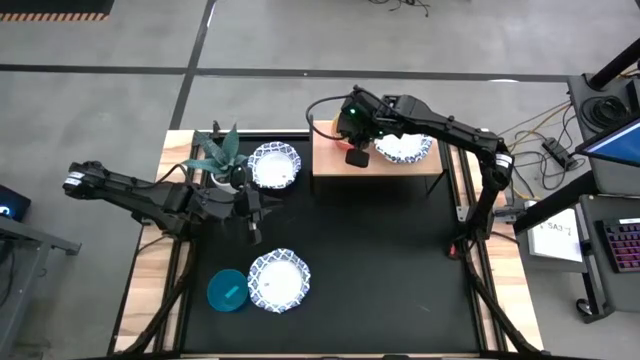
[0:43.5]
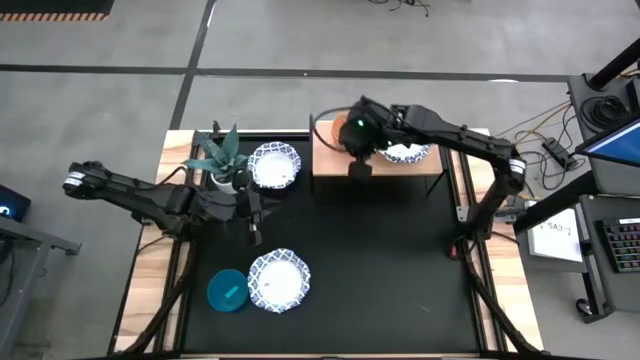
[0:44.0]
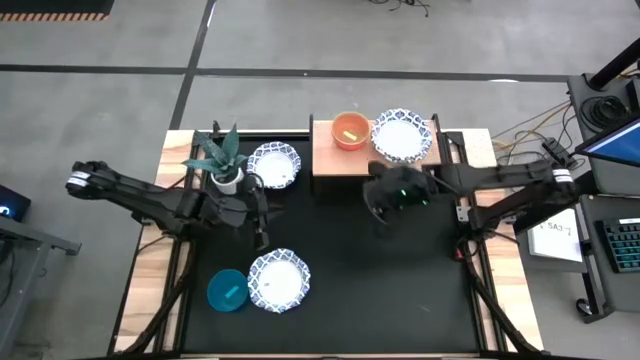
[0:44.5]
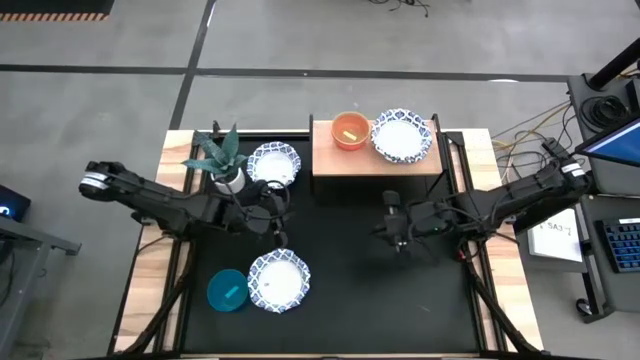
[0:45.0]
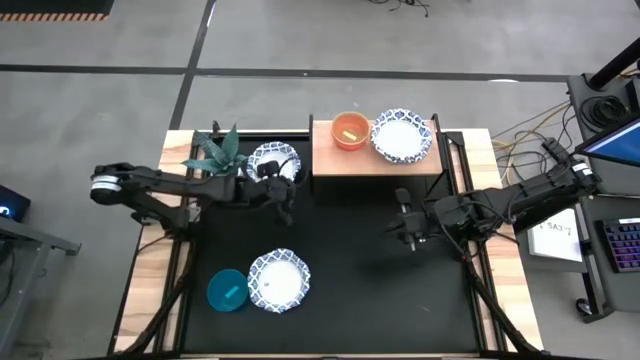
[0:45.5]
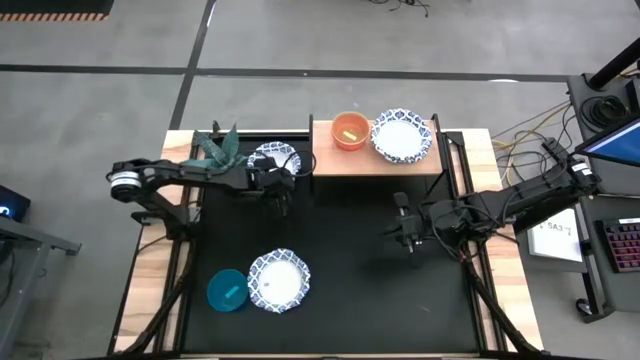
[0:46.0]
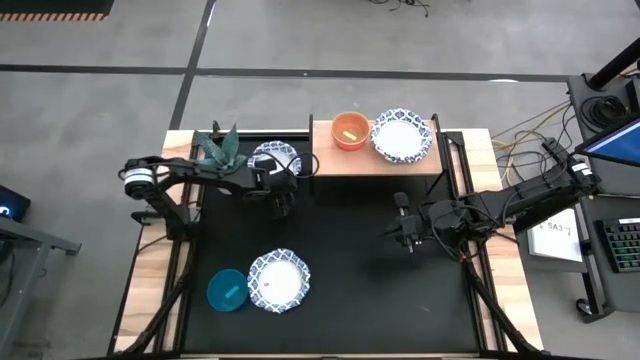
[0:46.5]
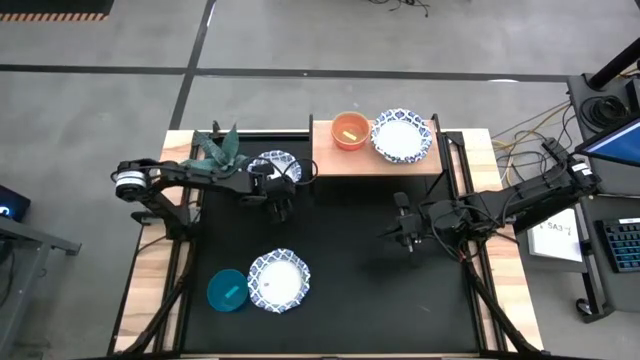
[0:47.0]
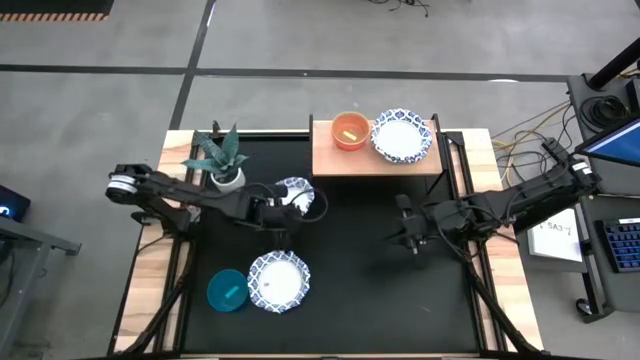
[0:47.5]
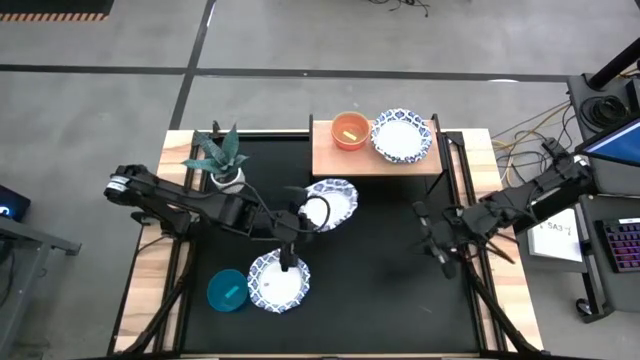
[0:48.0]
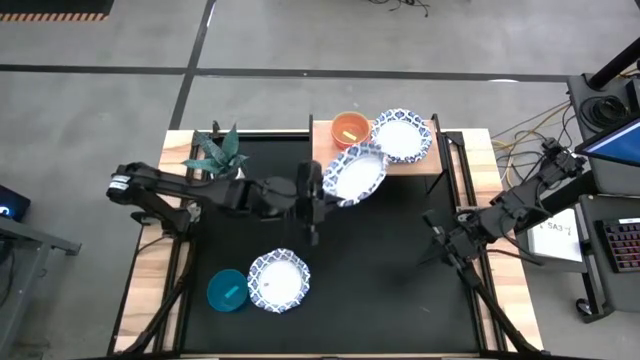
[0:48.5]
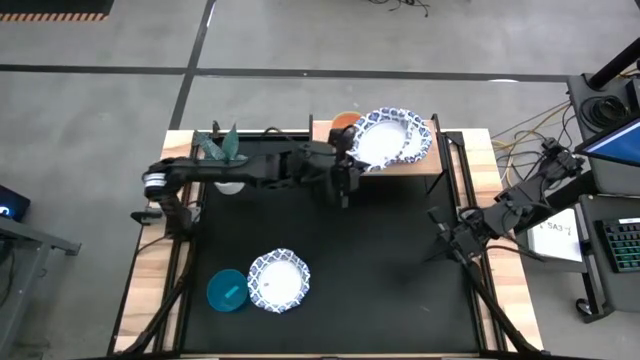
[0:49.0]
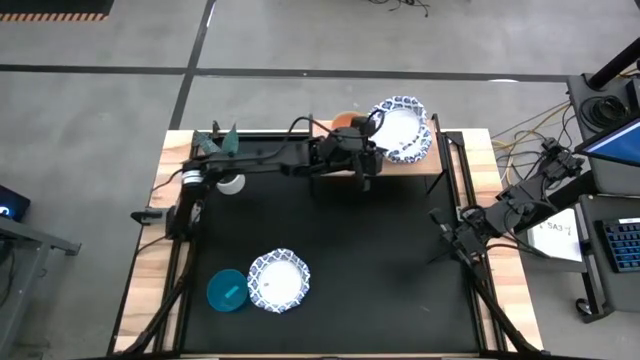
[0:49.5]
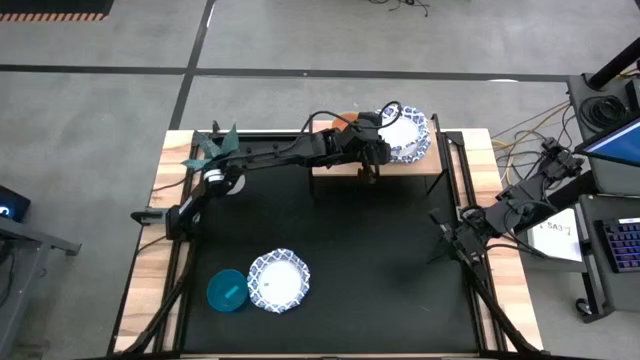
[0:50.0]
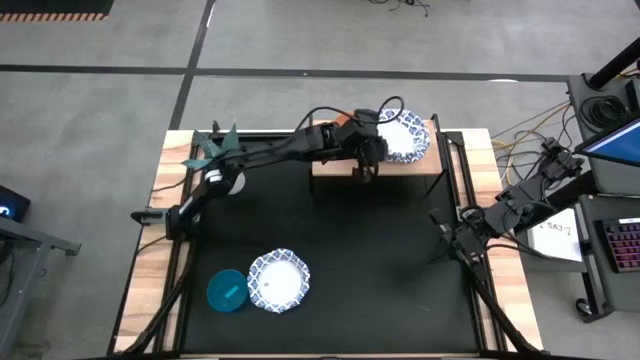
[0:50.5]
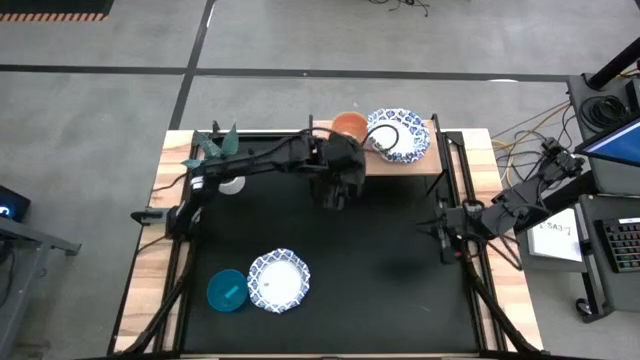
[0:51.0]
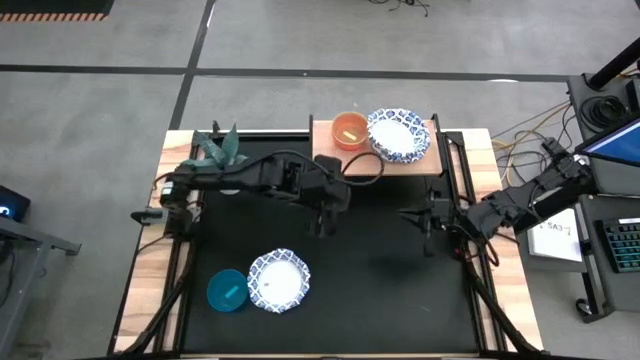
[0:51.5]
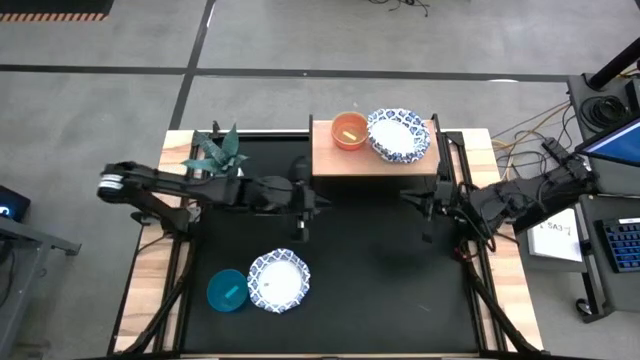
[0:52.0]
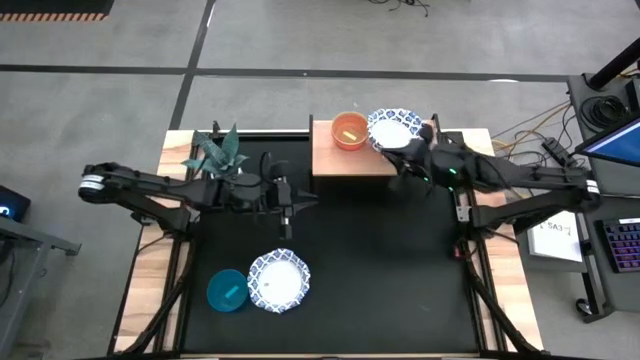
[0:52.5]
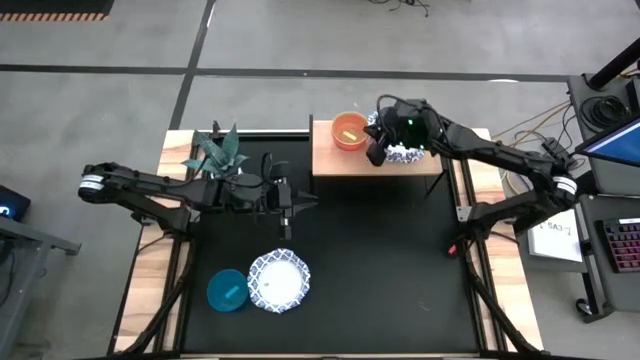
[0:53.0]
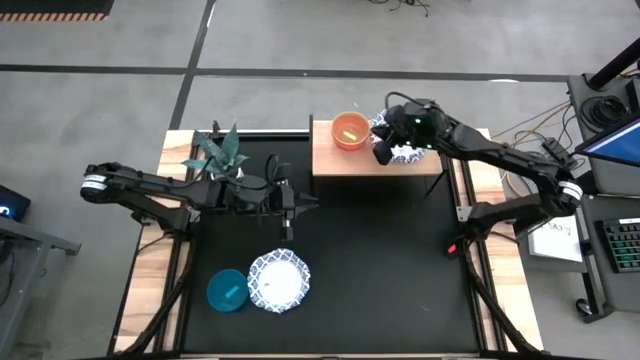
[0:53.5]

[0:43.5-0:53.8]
Task: Place and stack bowls onto a shelf
Stack the white paper plate on top of the white paper plate on the shelf

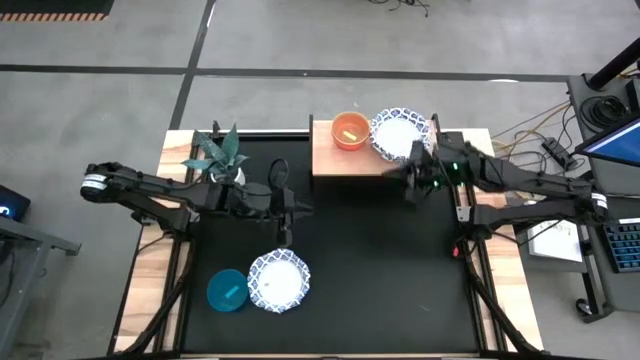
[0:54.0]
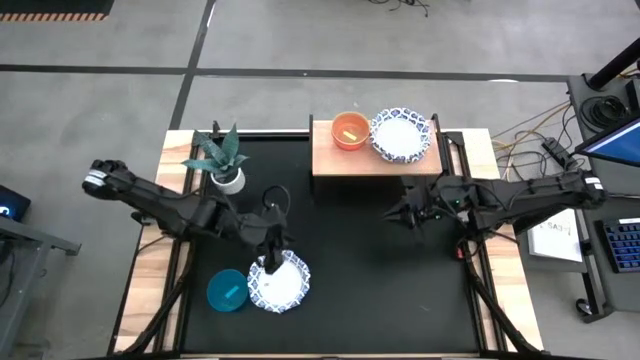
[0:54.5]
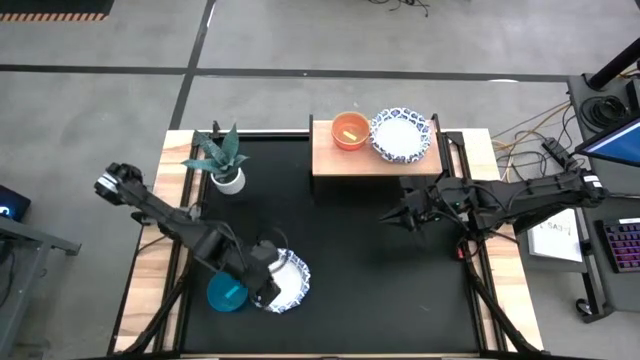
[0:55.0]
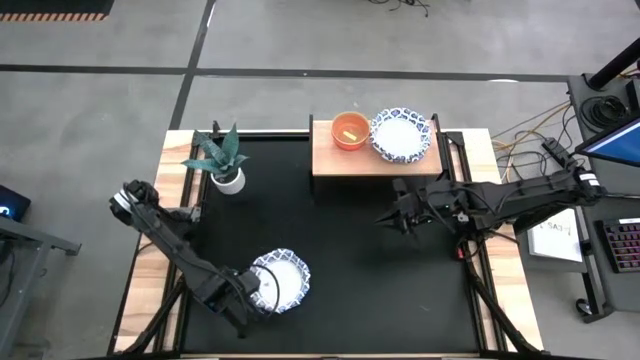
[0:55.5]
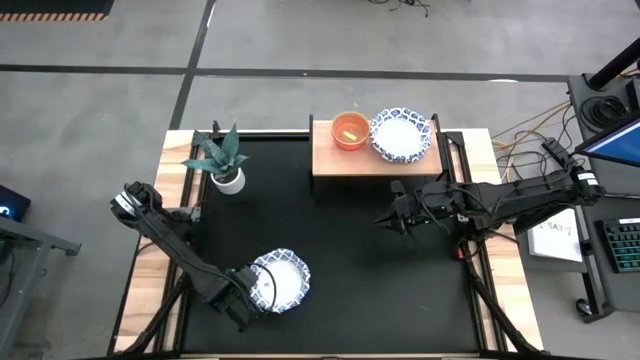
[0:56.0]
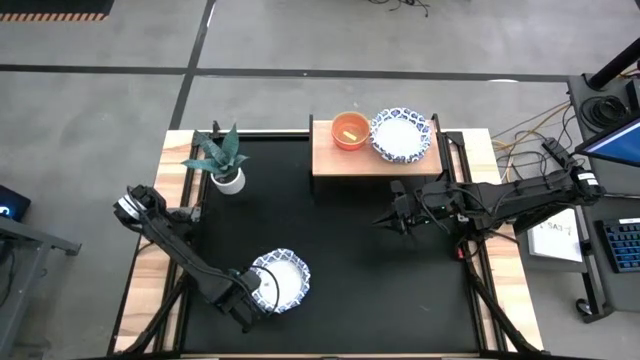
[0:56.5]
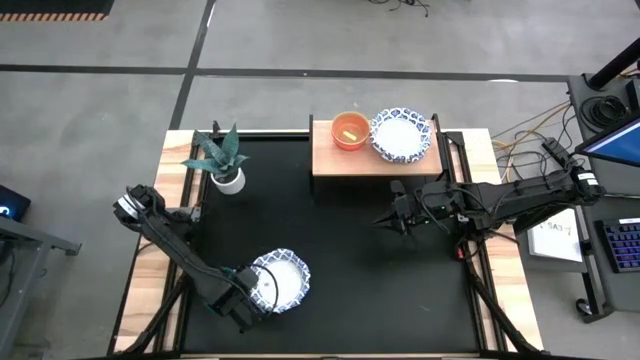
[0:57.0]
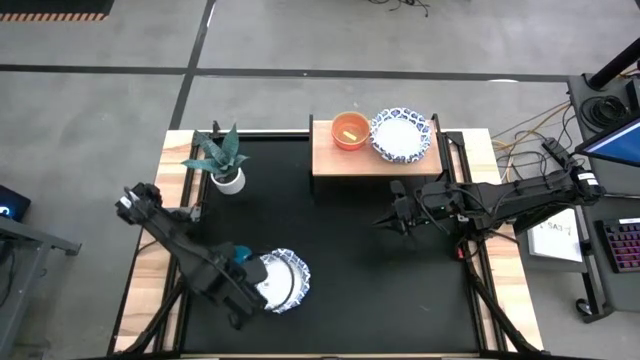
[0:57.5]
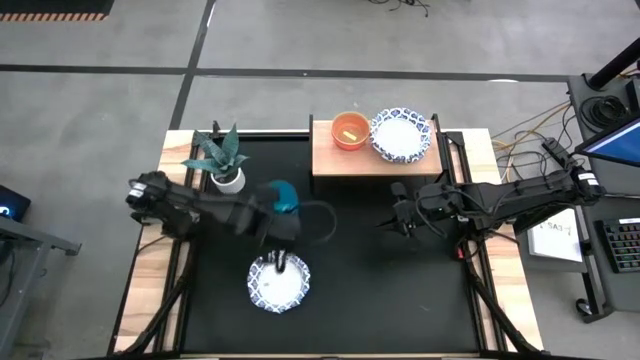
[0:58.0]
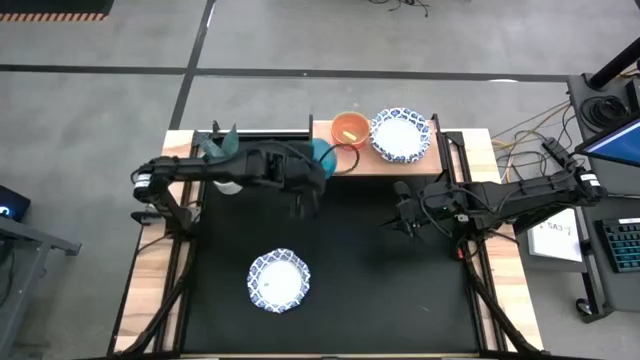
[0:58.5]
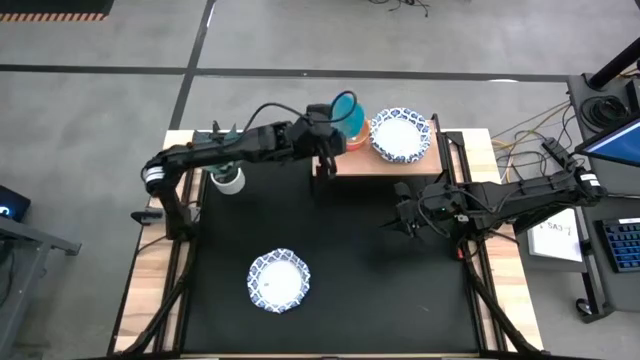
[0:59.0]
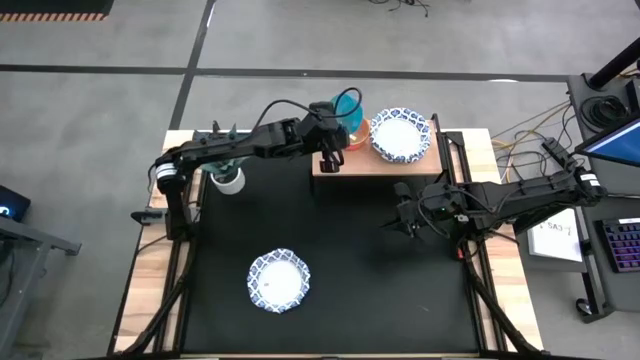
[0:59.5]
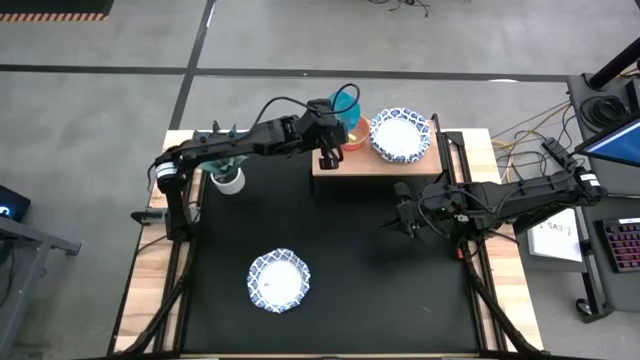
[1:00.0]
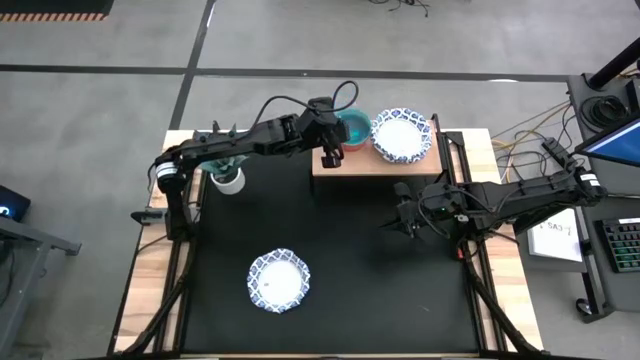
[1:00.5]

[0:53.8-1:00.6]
Stack the blue bowl on the yellow bowl on the stock shelf

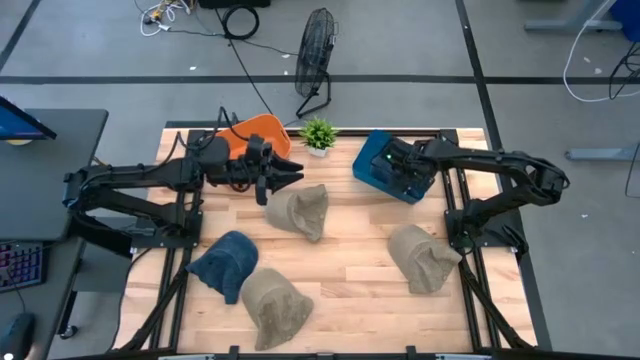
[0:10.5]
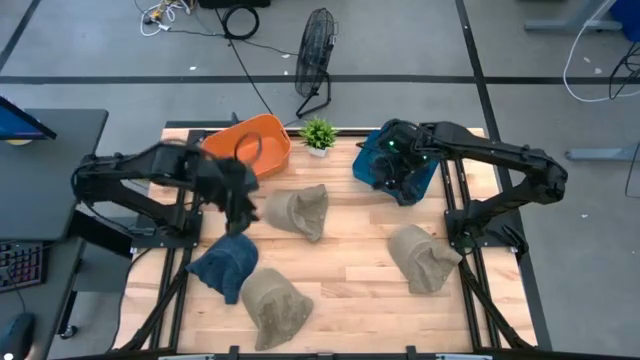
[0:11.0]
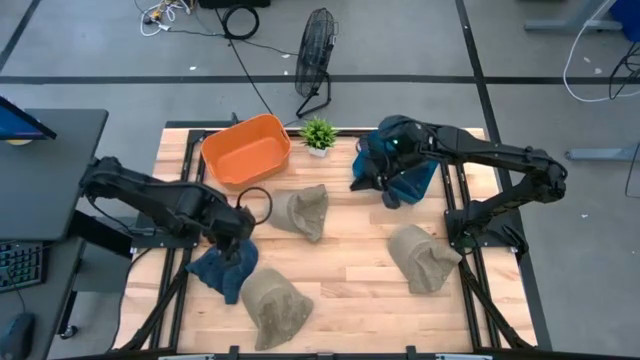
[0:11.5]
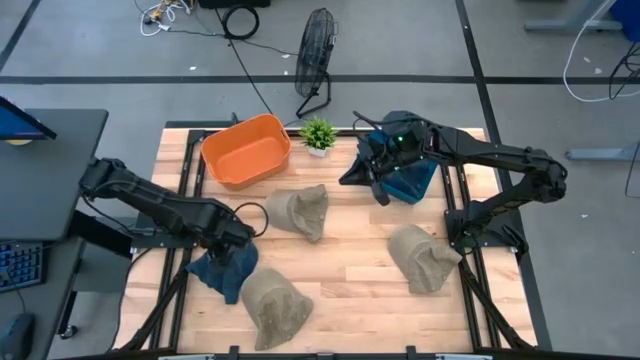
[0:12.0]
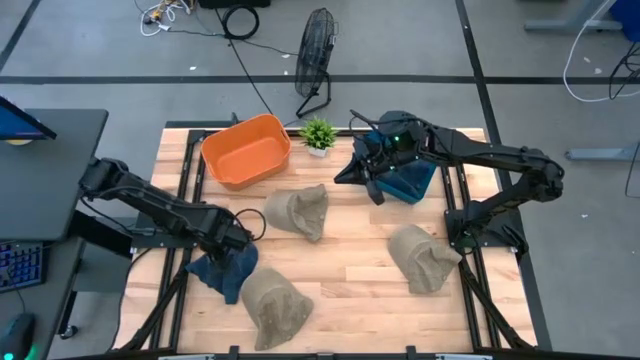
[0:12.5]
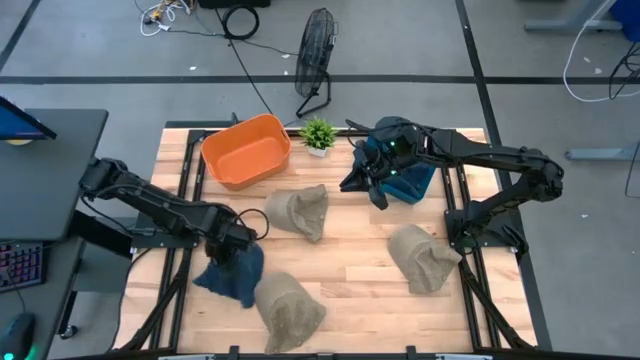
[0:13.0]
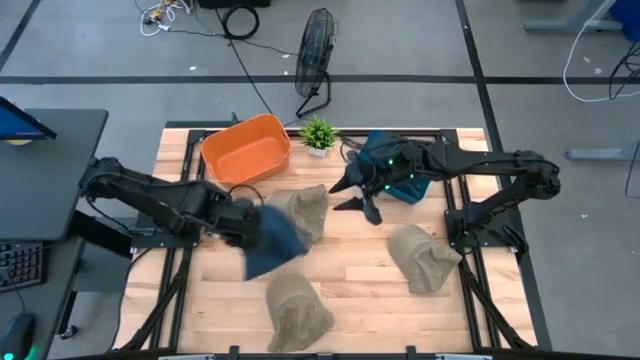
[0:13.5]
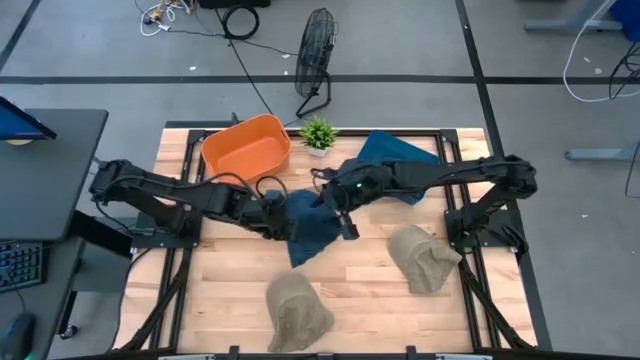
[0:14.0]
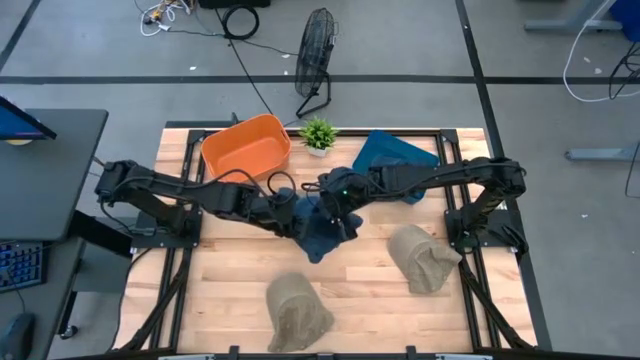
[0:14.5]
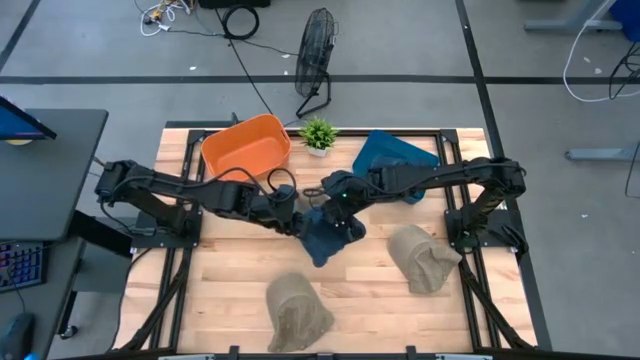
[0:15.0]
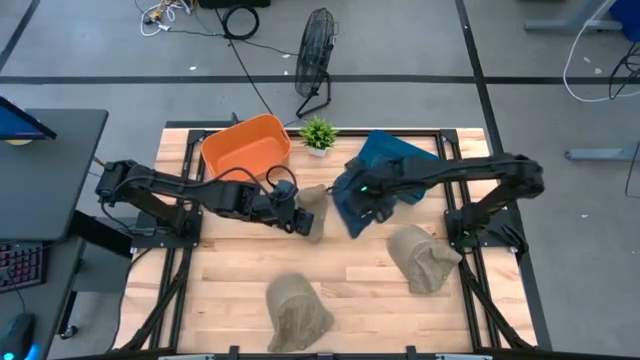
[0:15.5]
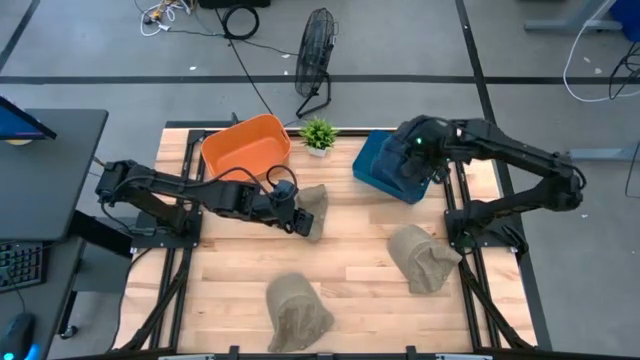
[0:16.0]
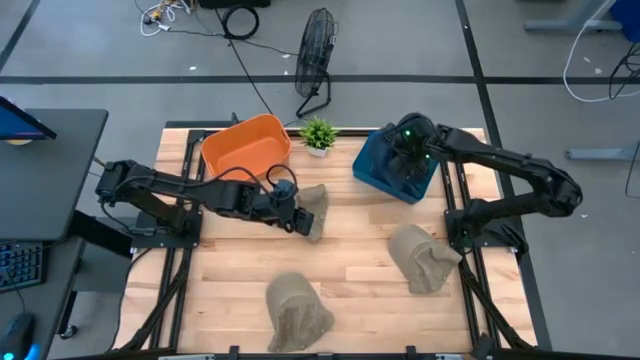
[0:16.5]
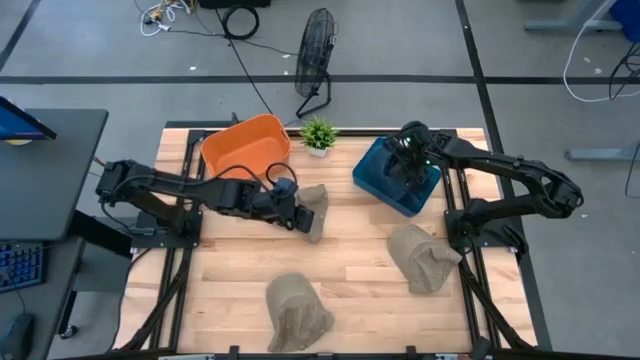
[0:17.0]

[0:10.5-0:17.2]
Task: Pick & Place hat
Put the blue cap into the blue bin
